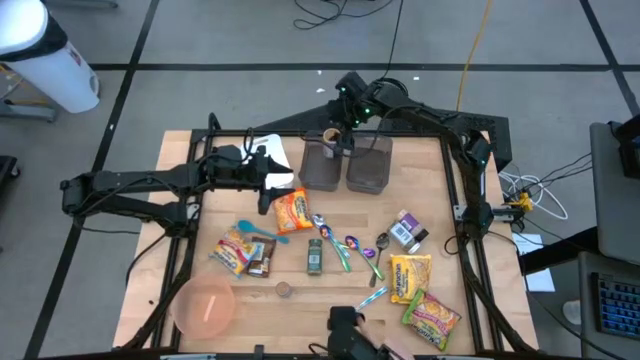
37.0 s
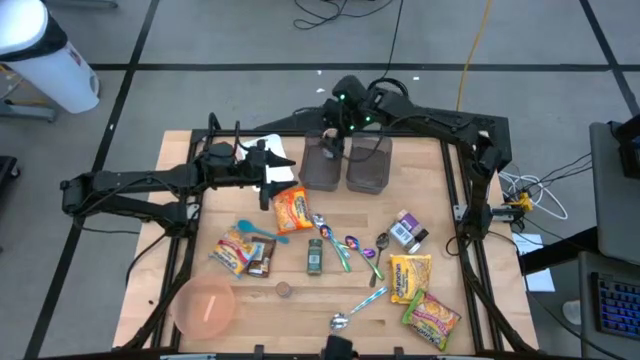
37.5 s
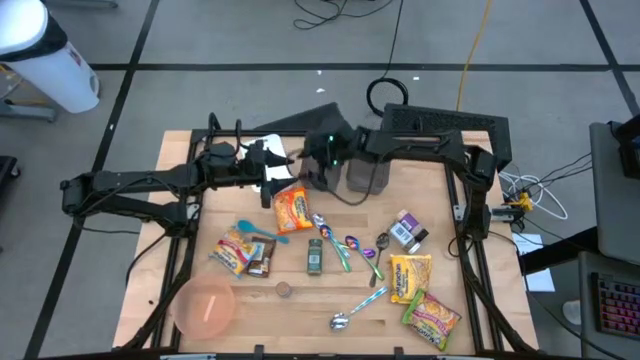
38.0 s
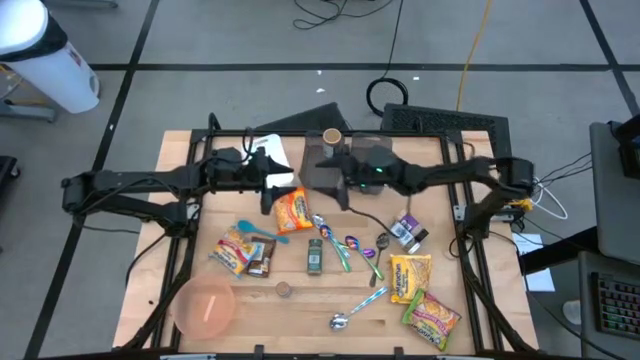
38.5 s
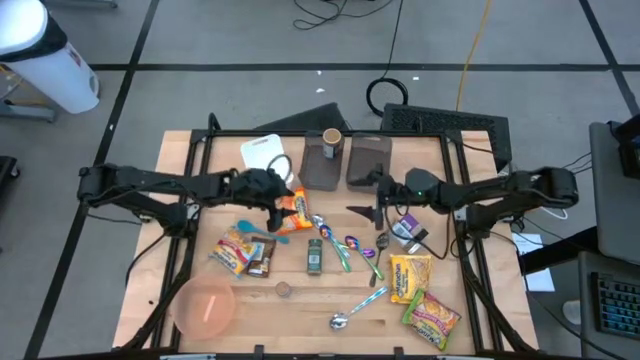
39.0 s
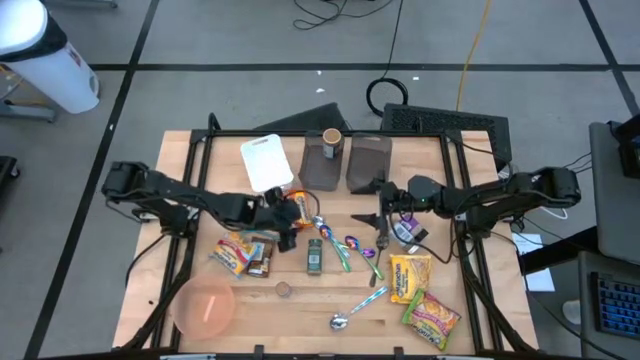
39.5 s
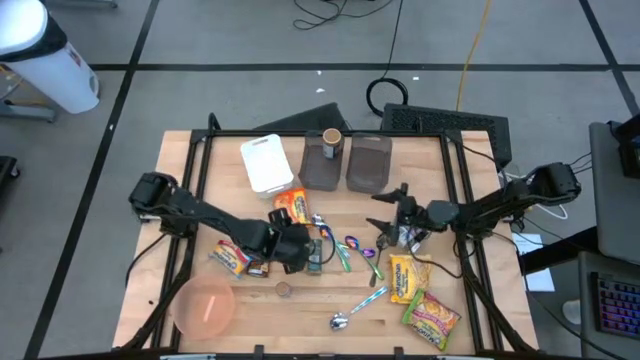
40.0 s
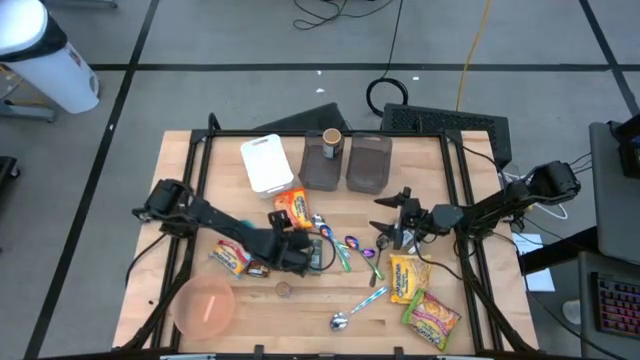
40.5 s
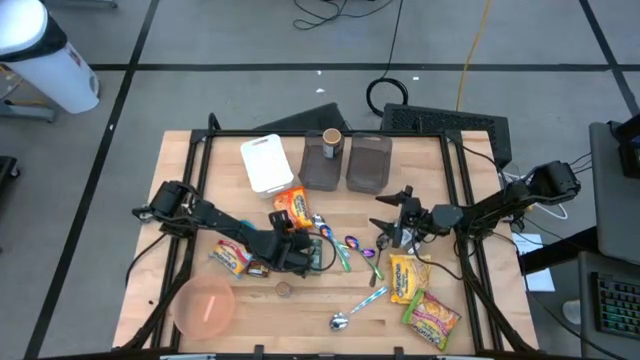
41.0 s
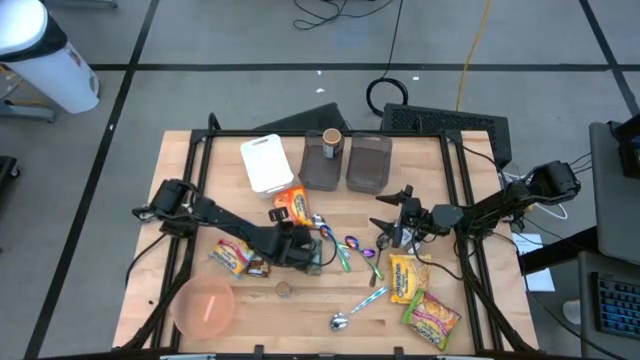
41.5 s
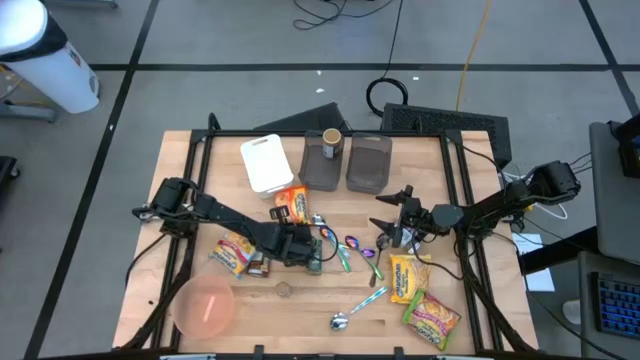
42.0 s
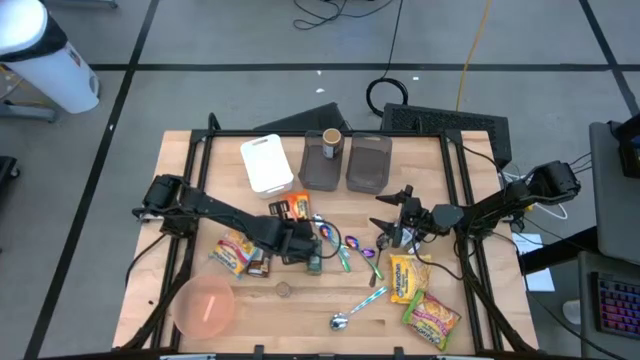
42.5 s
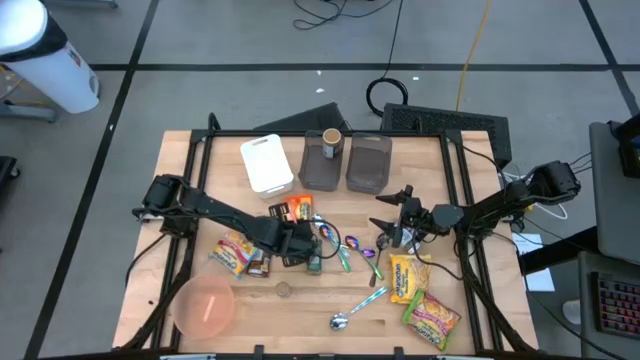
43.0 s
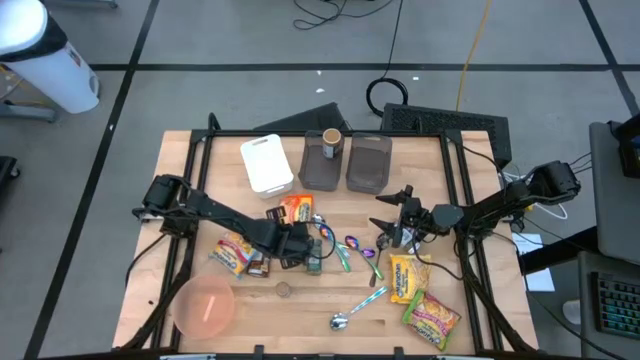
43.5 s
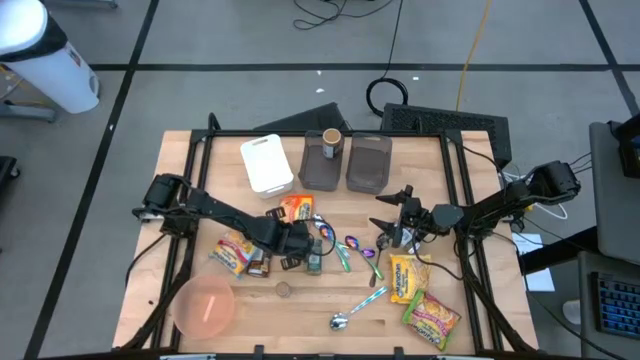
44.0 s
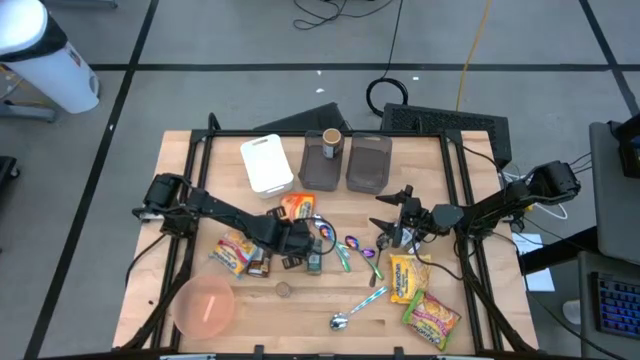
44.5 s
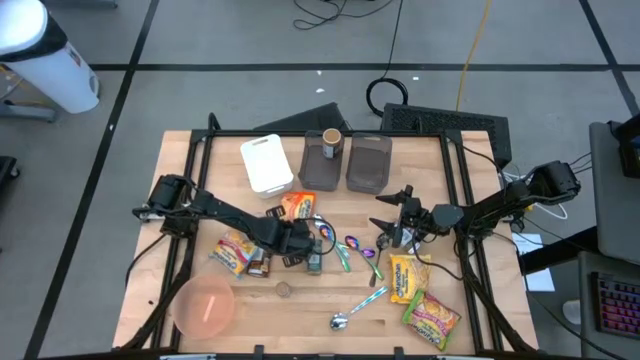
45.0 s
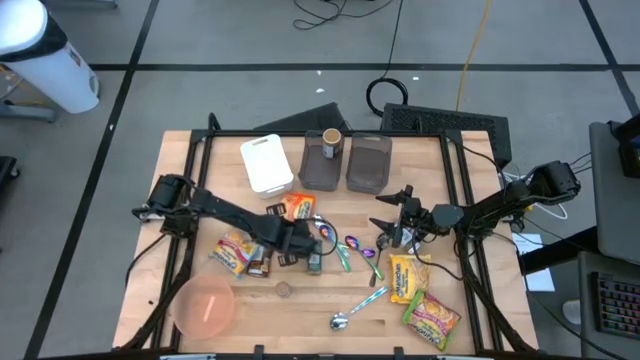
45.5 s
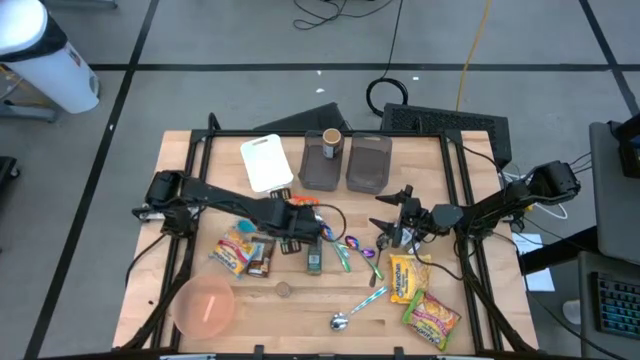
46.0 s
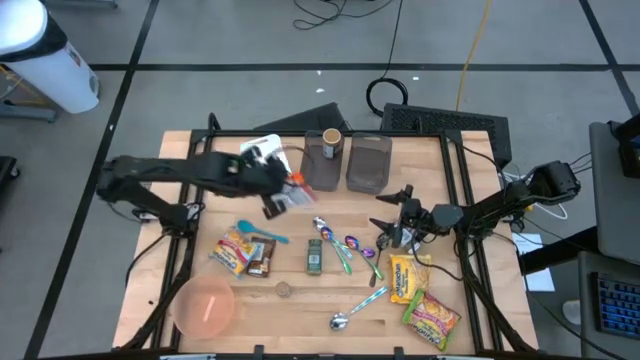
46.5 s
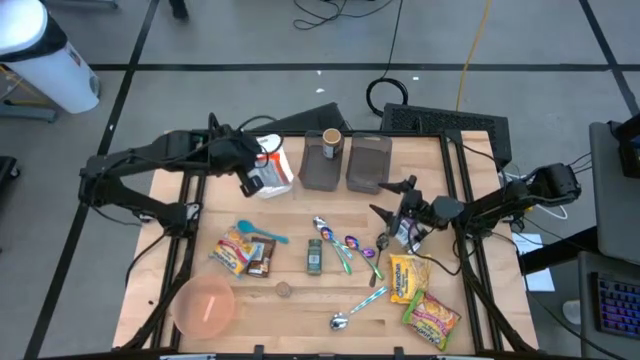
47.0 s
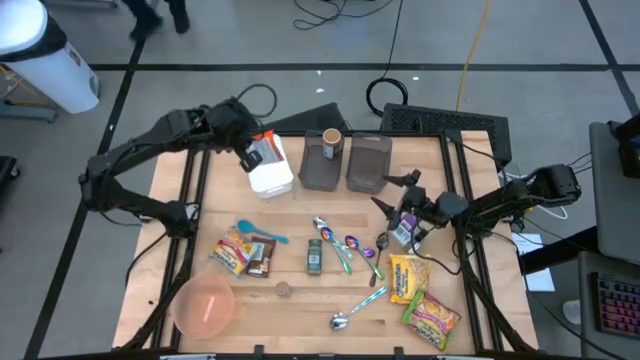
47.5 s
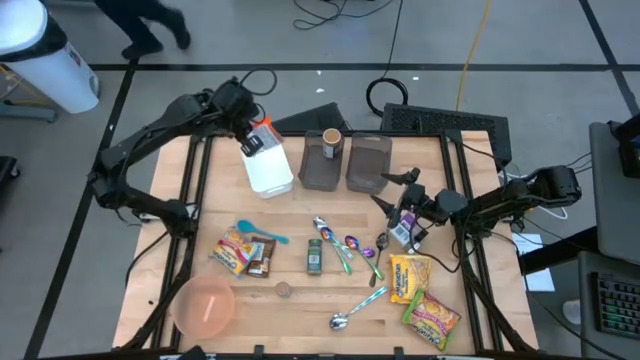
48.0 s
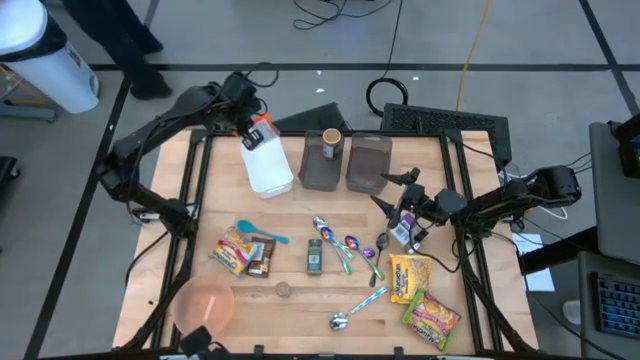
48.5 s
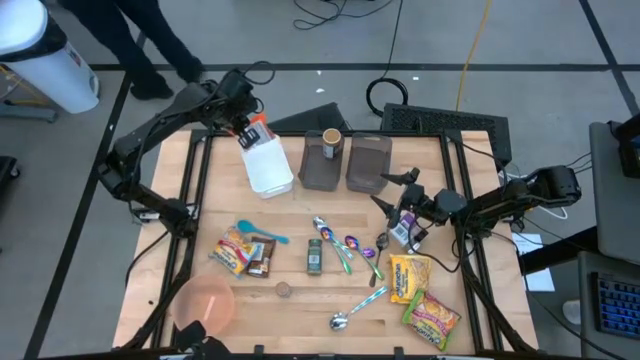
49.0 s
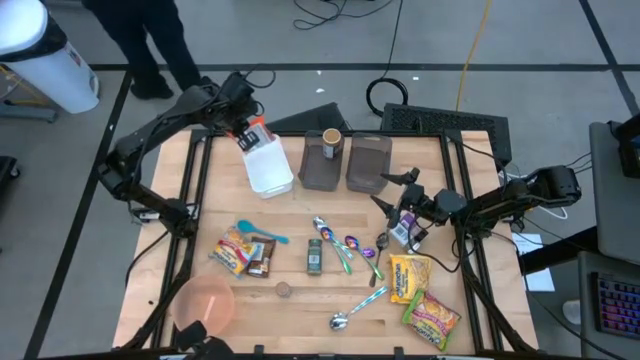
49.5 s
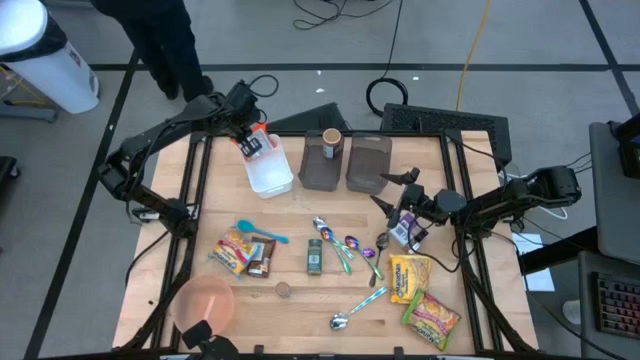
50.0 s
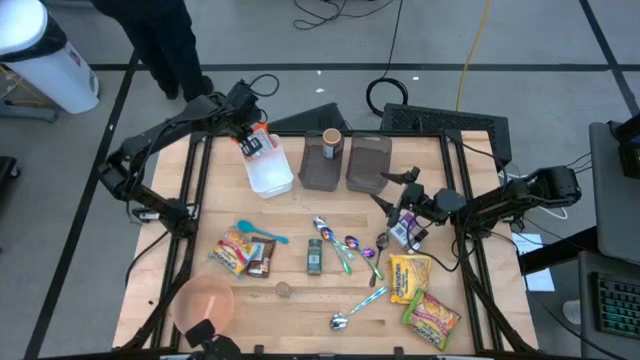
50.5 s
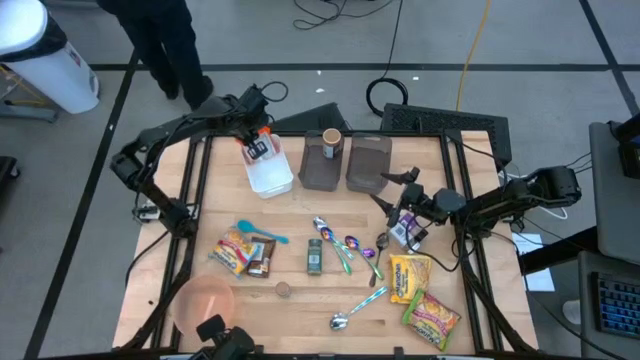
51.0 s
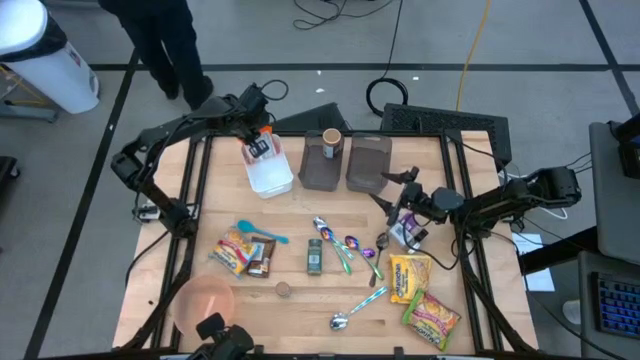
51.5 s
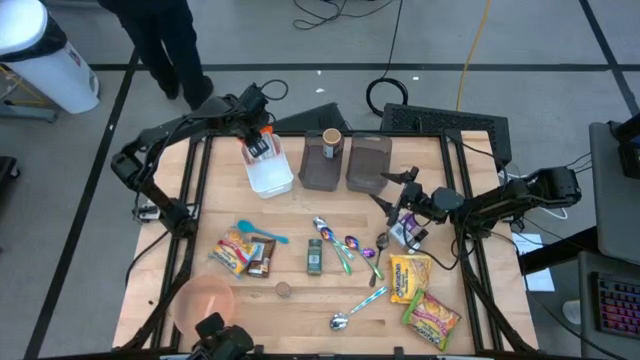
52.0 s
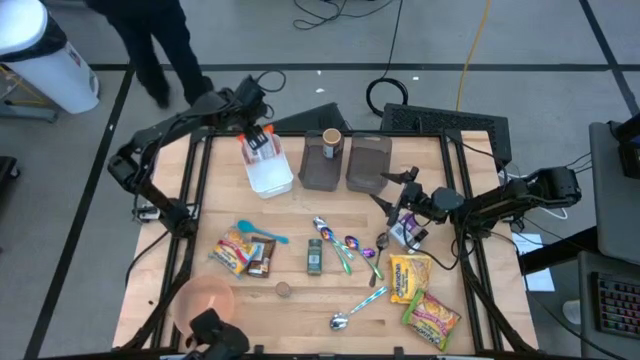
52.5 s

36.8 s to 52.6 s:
Task: Pick & Place Food Item
Put the orange noodle pack into the white bin

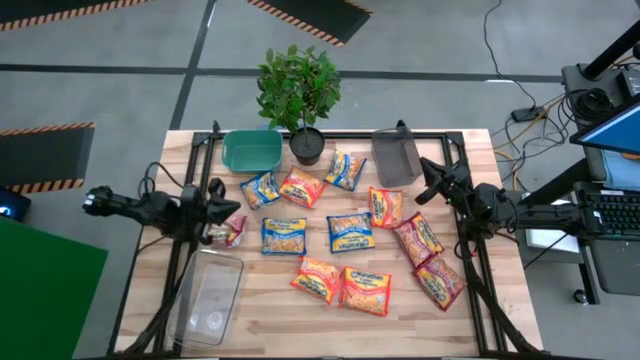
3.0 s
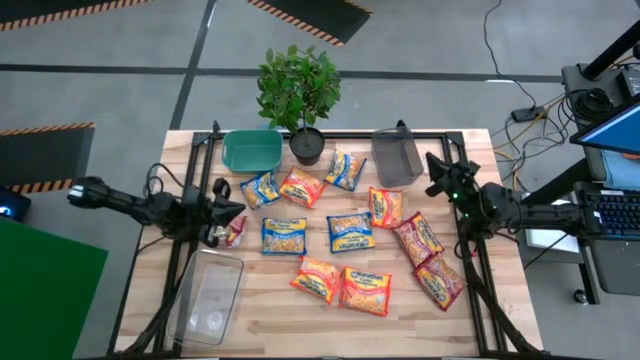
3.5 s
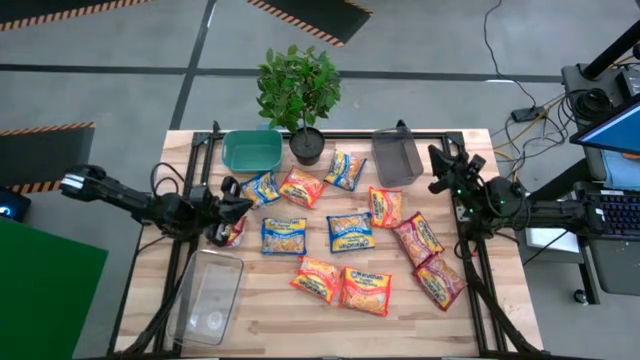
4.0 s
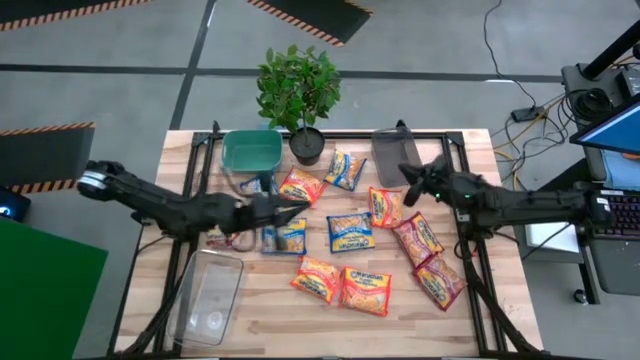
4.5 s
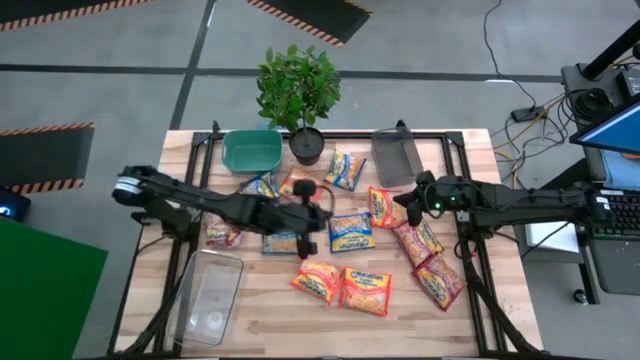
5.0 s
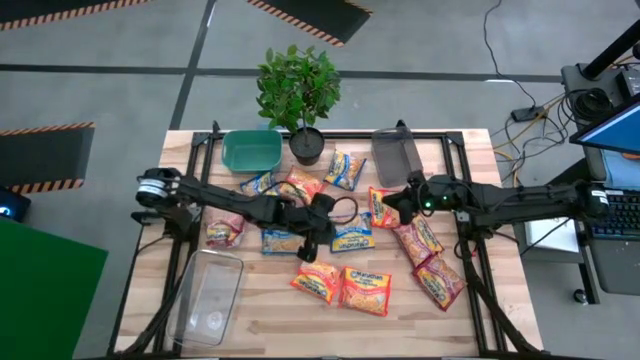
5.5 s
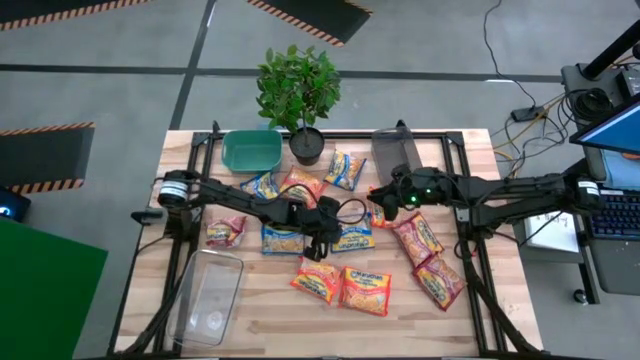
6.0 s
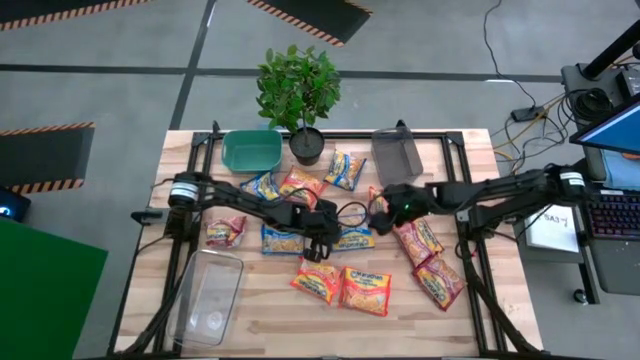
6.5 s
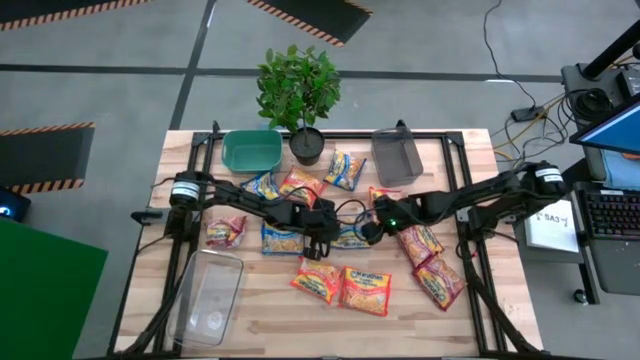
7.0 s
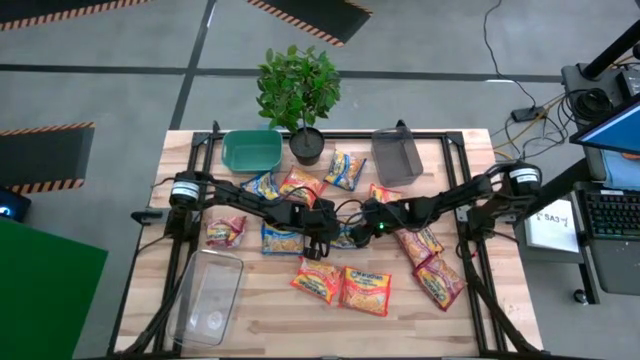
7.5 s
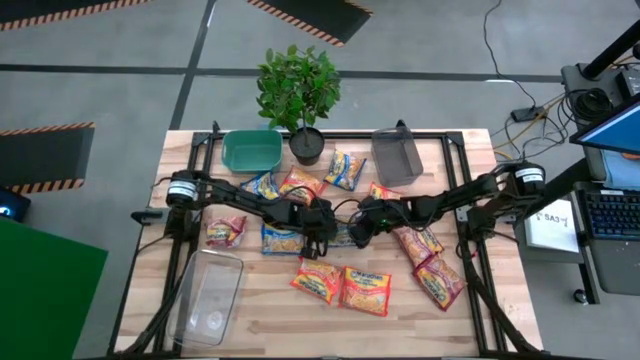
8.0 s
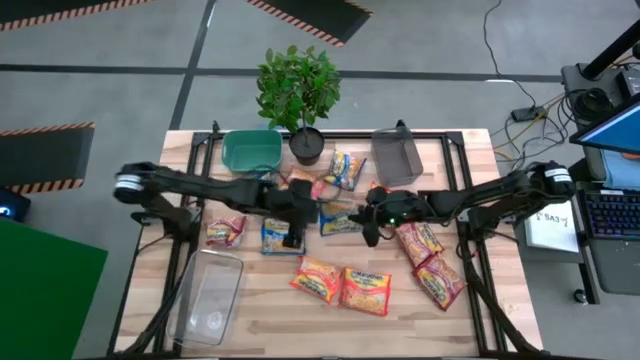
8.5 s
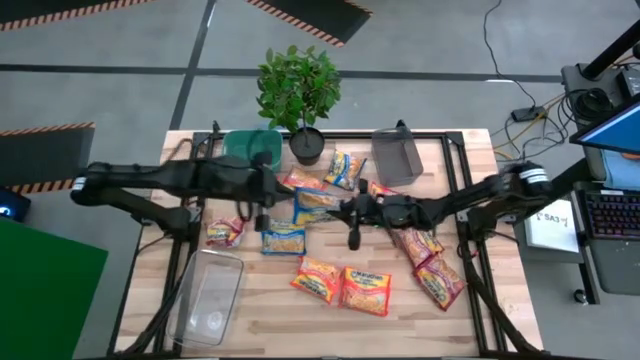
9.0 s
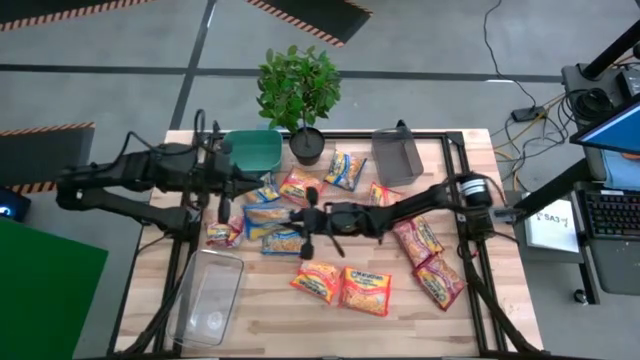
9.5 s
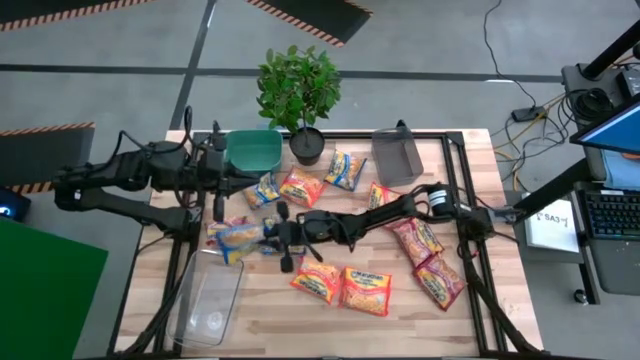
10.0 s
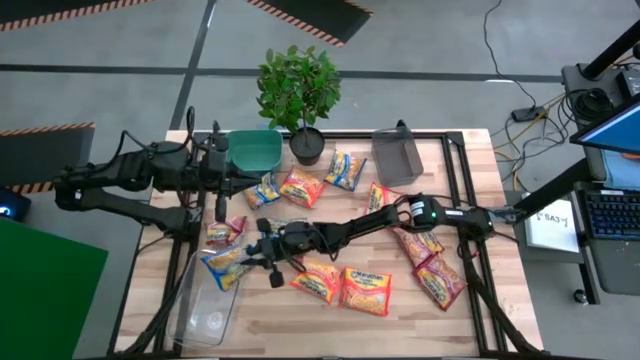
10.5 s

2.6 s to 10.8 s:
Task: Sort Maruchan noodles
Put the blue noodle pack into the transparent bin
